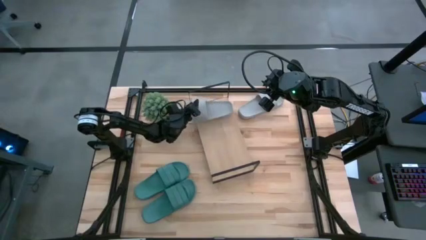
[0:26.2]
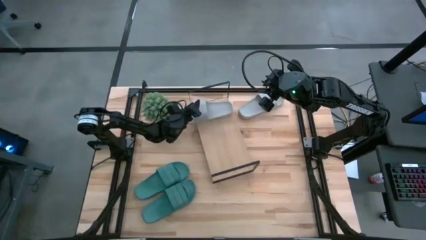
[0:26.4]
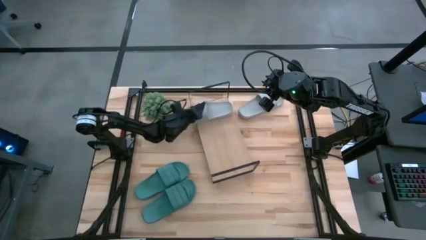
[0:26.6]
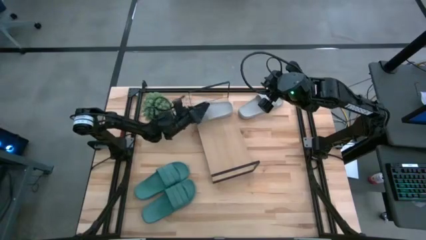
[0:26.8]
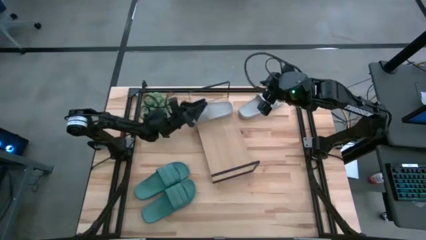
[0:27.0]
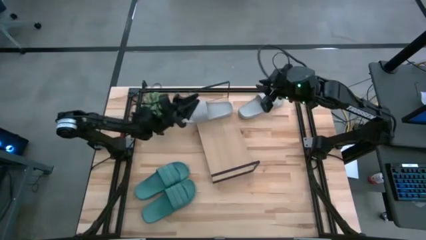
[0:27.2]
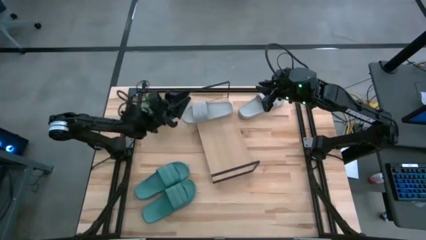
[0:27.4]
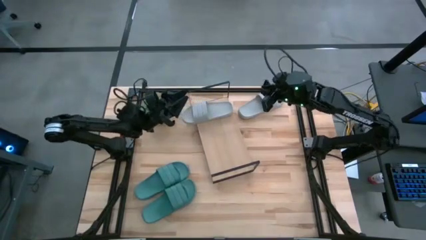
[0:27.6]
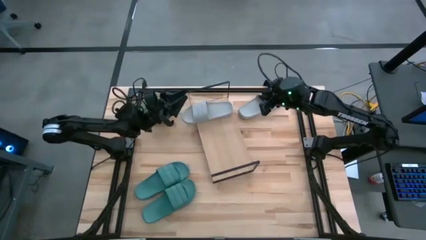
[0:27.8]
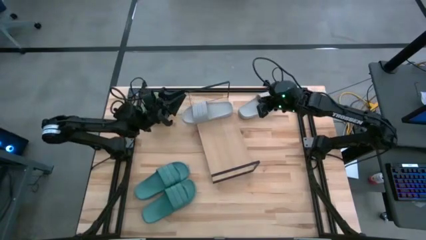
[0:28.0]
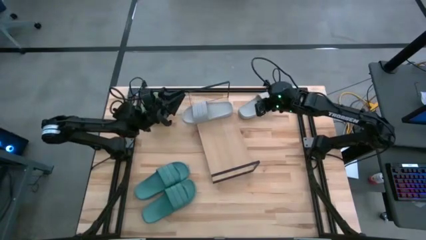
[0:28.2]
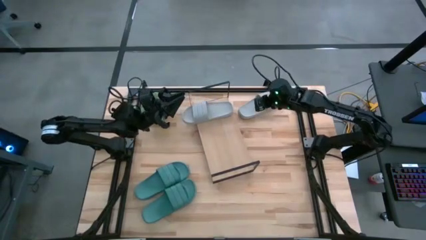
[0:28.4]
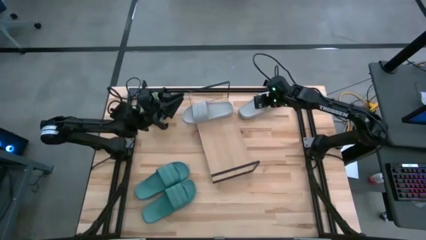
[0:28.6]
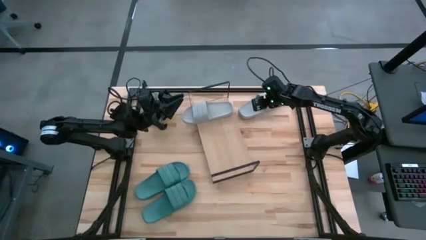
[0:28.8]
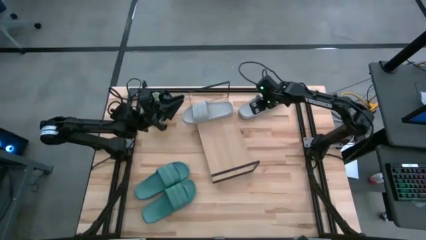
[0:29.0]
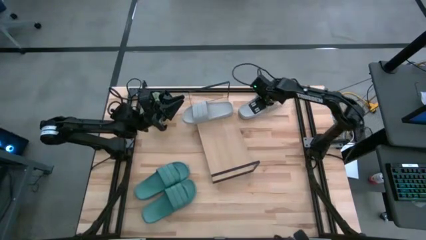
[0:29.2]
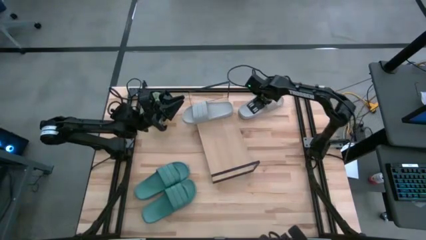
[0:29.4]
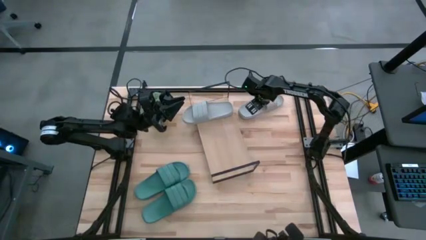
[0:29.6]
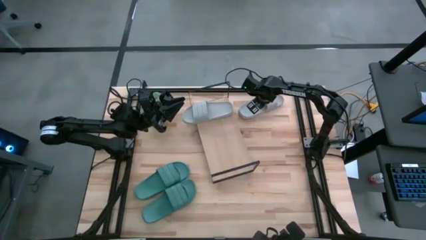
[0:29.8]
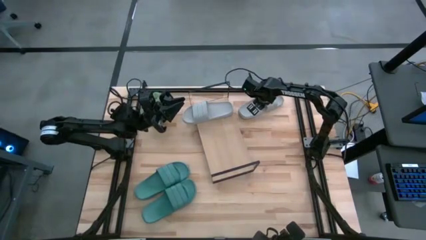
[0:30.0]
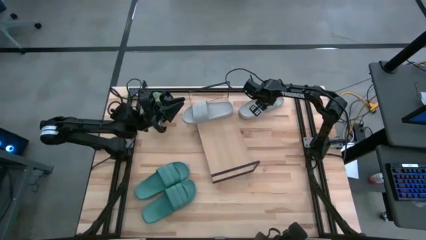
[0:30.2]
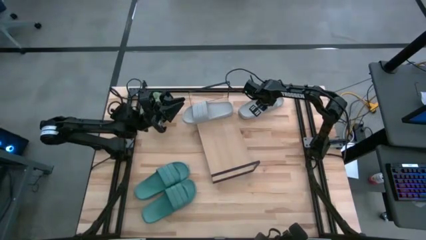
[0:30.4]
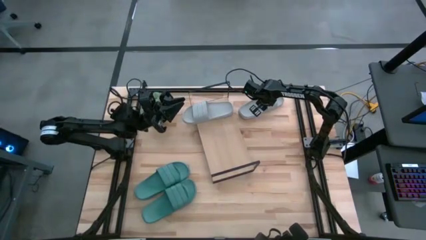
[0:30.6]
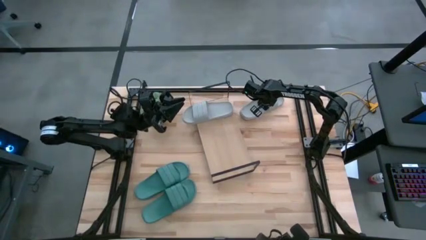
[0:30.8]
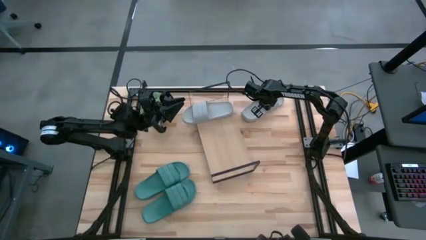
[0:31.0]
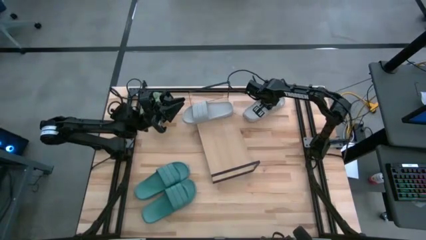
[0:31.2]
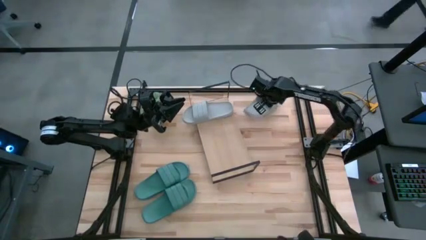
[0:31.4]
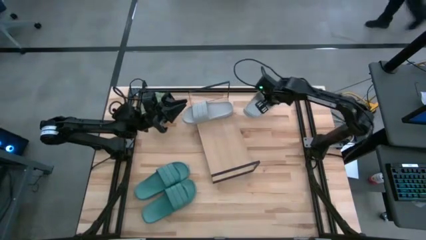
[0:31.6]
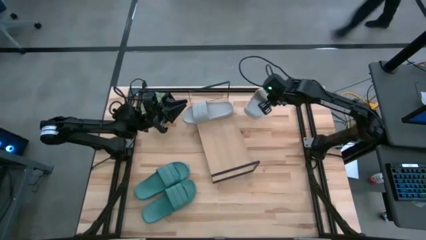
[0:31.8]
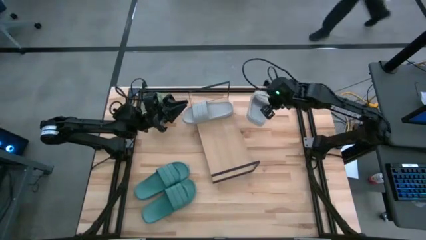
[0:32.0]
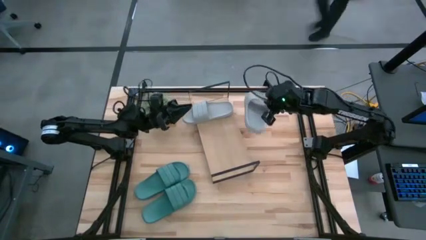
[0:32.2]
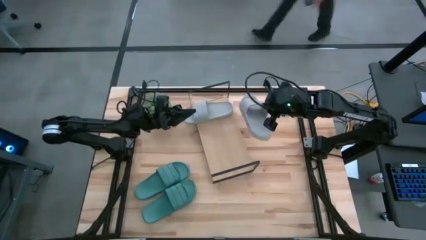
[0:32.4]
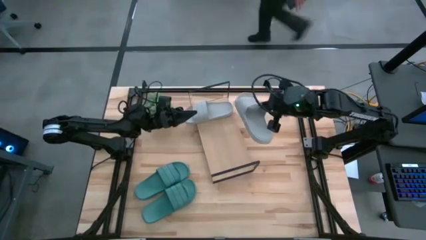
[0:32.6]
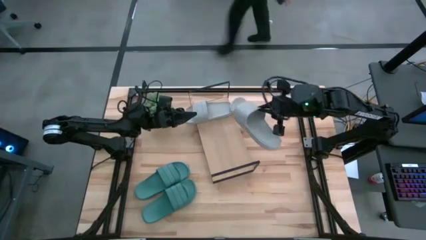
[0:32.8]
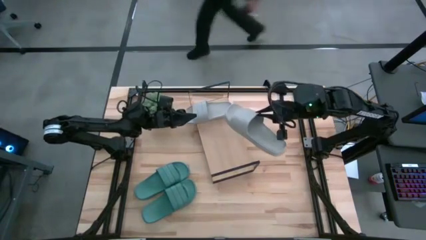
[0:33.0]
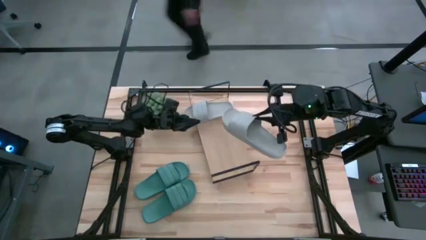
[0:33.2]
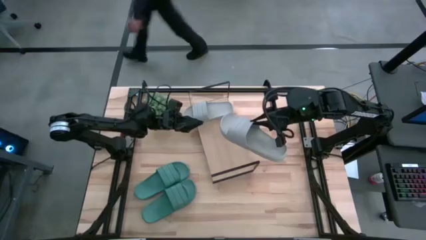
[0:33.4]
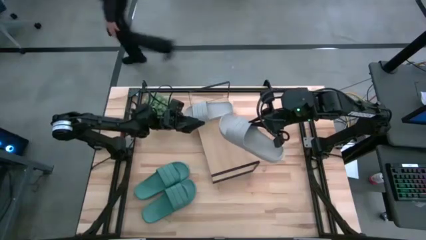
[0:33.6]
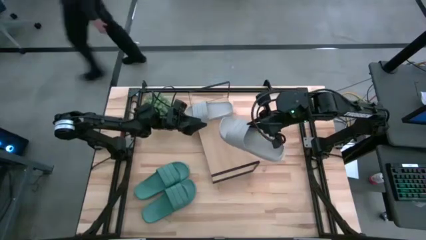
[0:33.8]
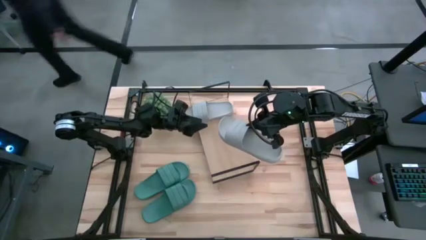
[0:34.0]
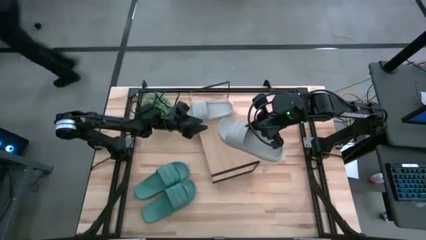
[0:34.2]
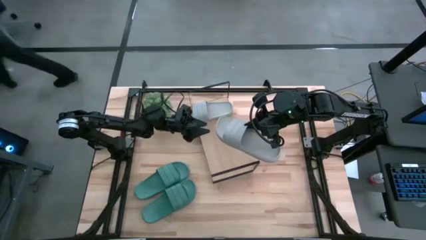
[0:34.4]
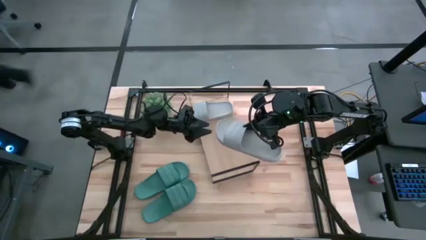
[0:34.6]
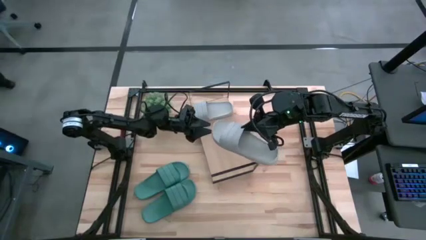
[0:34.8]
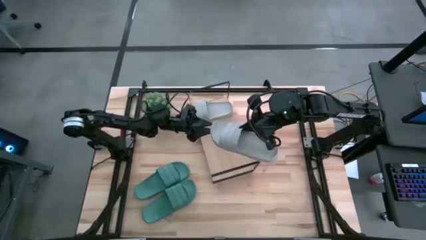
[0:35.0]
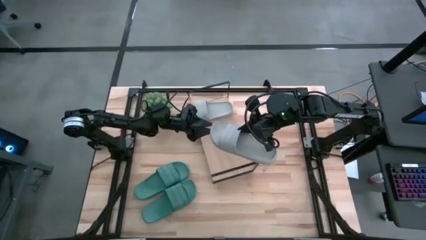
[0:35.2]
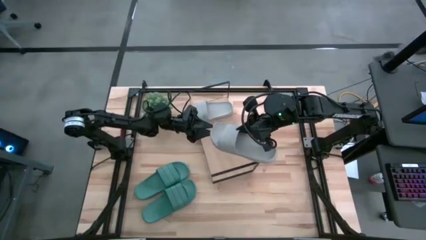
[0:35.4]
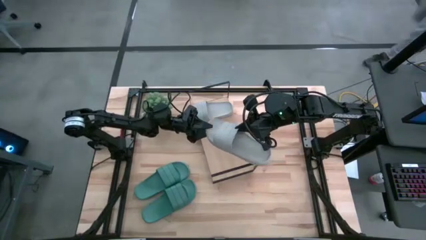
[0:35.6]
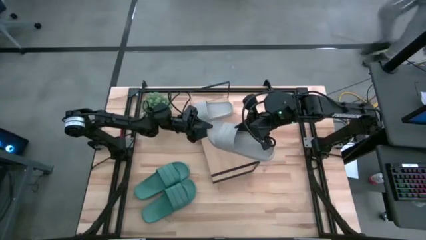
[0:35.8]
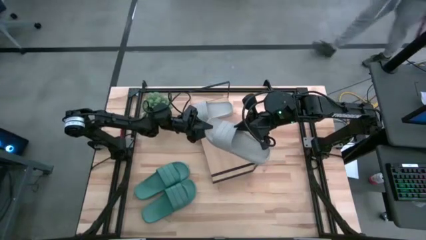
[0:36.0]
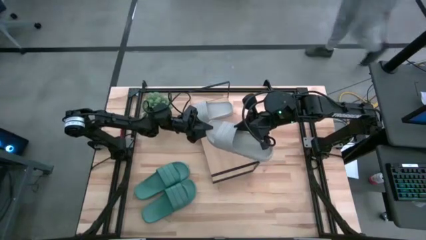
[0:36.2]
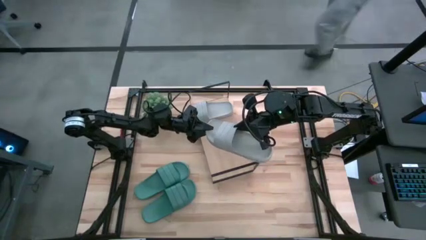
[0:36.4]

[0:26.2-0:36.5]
Task: Pick and place slides into the shelf
Put the gray slipper on the shelf
